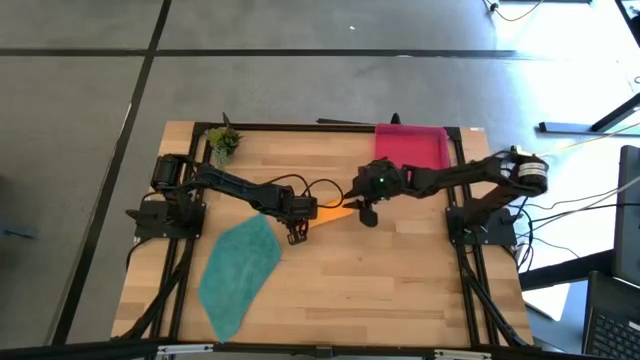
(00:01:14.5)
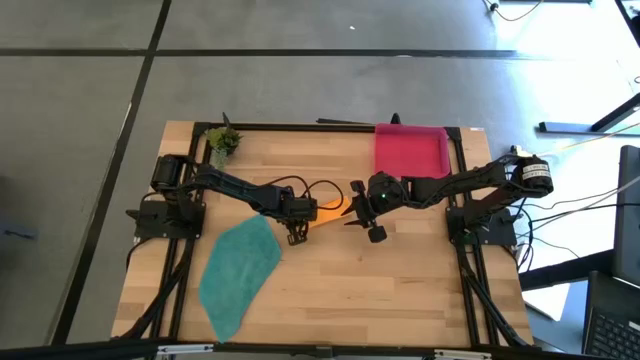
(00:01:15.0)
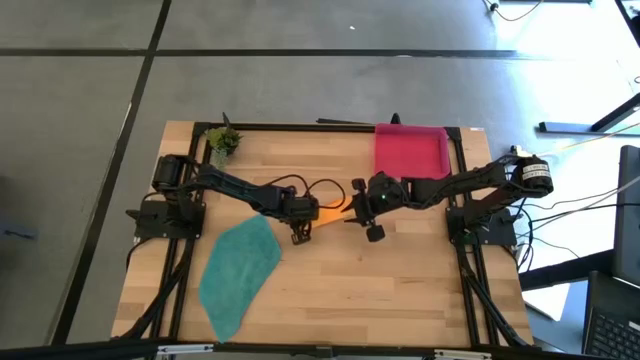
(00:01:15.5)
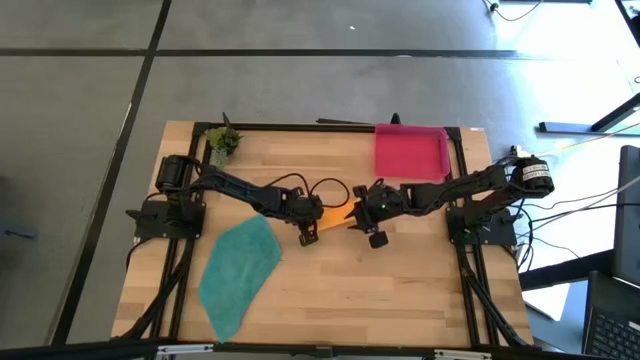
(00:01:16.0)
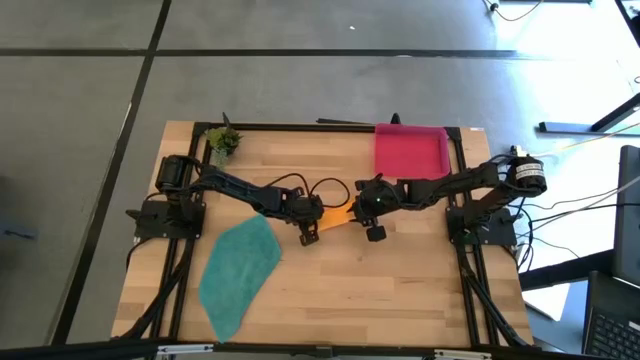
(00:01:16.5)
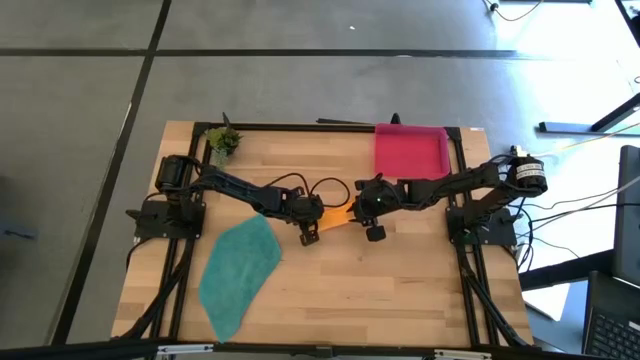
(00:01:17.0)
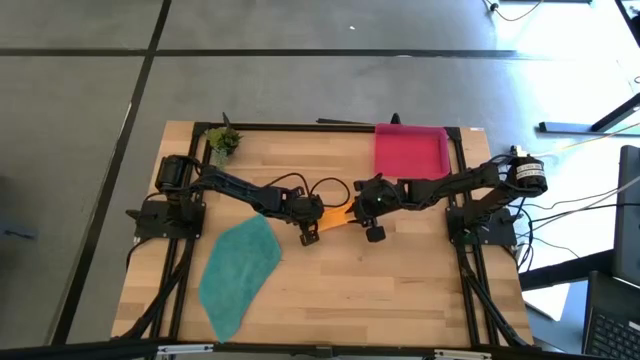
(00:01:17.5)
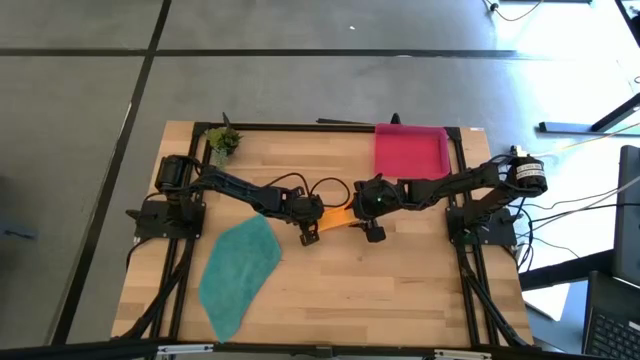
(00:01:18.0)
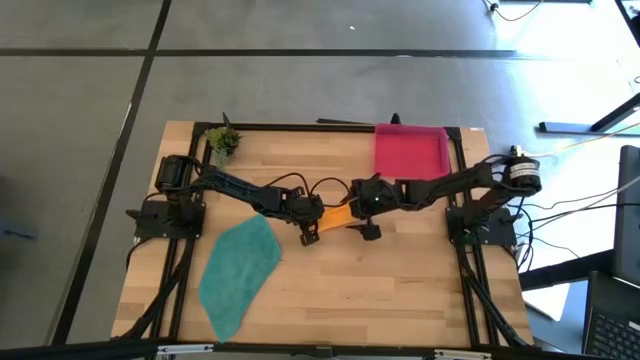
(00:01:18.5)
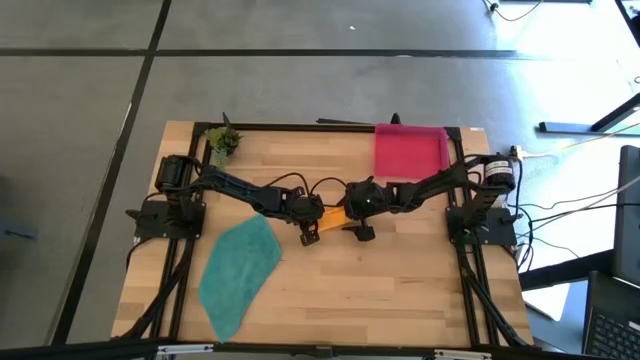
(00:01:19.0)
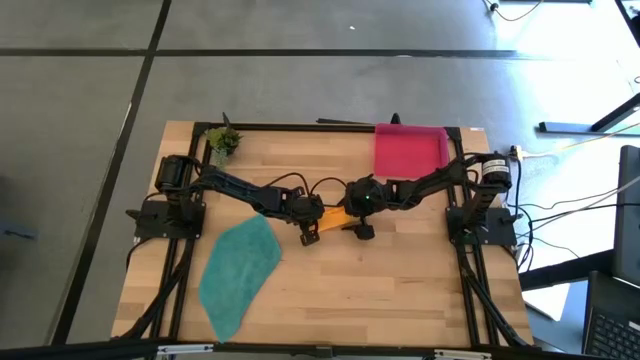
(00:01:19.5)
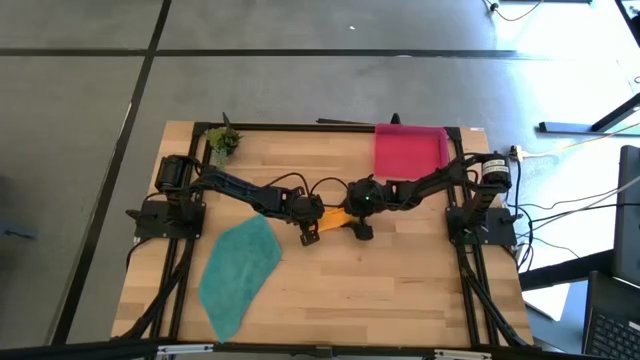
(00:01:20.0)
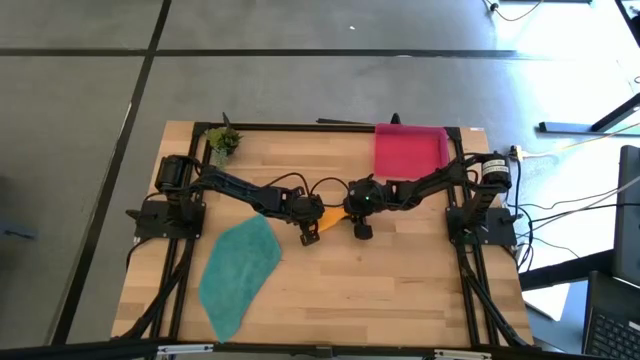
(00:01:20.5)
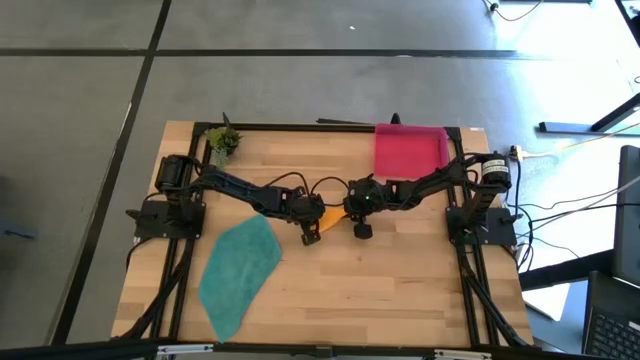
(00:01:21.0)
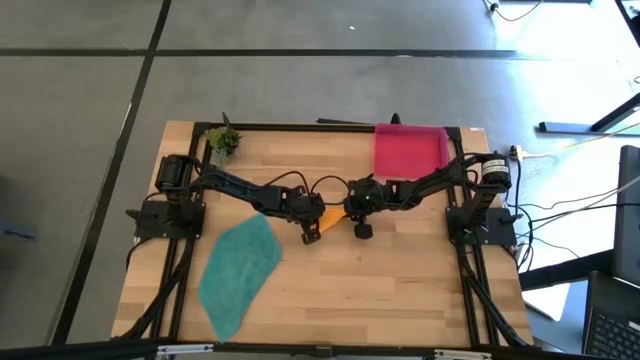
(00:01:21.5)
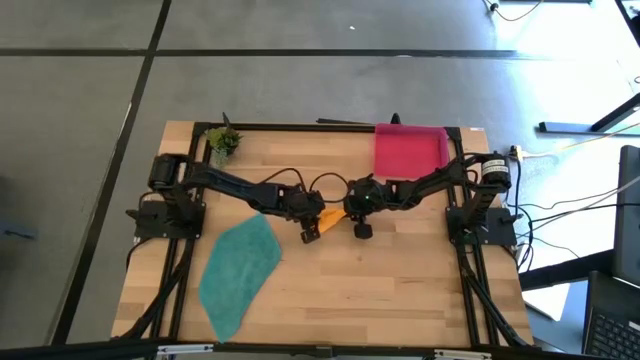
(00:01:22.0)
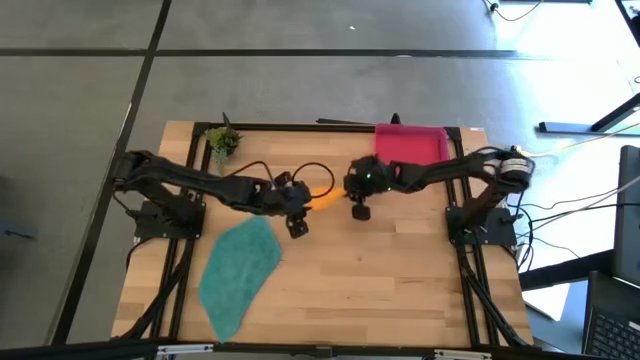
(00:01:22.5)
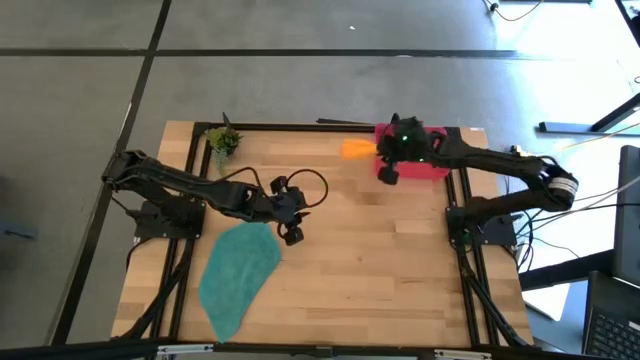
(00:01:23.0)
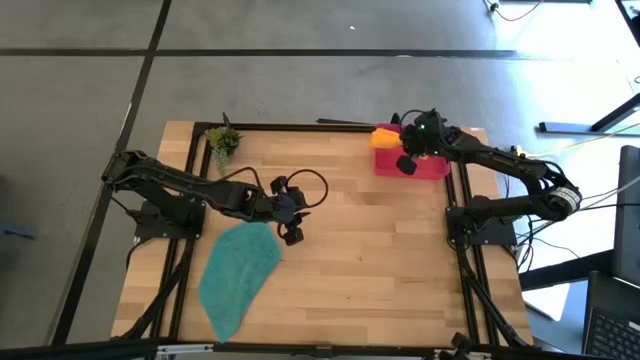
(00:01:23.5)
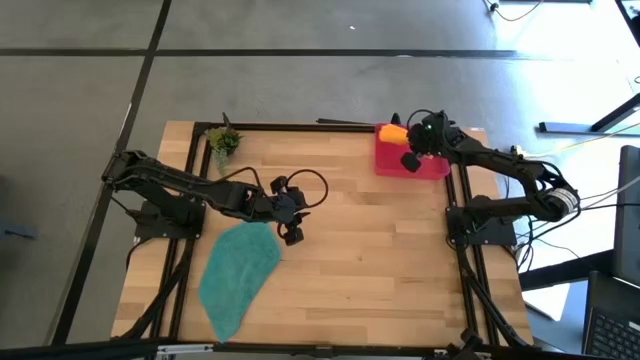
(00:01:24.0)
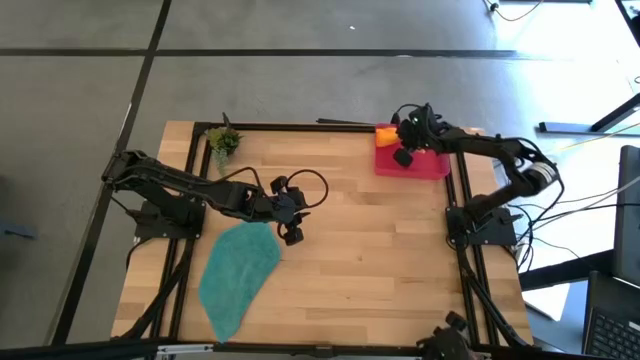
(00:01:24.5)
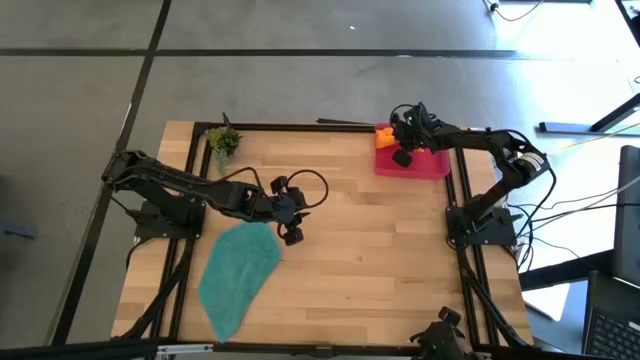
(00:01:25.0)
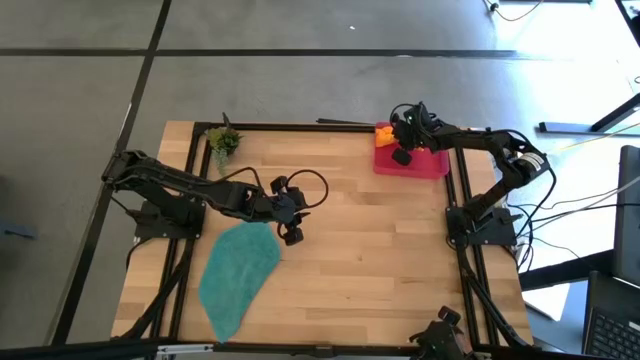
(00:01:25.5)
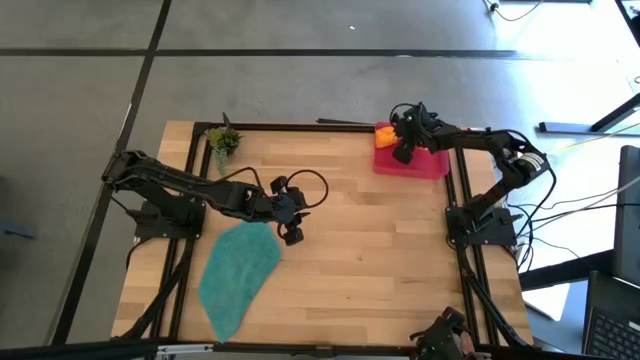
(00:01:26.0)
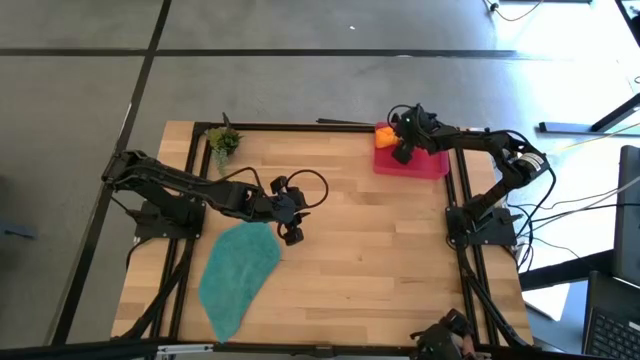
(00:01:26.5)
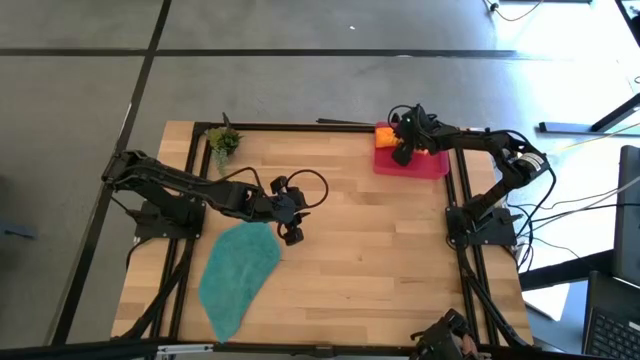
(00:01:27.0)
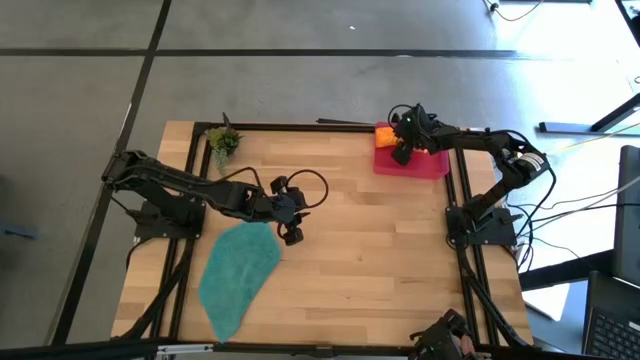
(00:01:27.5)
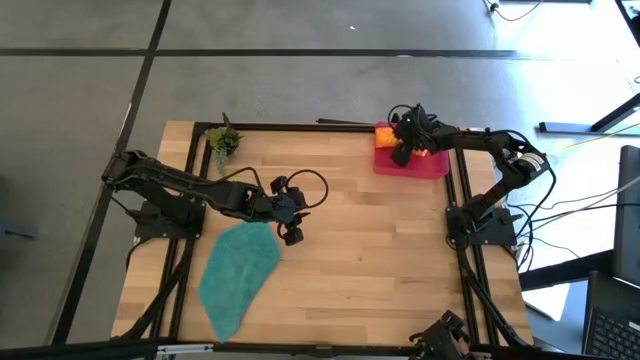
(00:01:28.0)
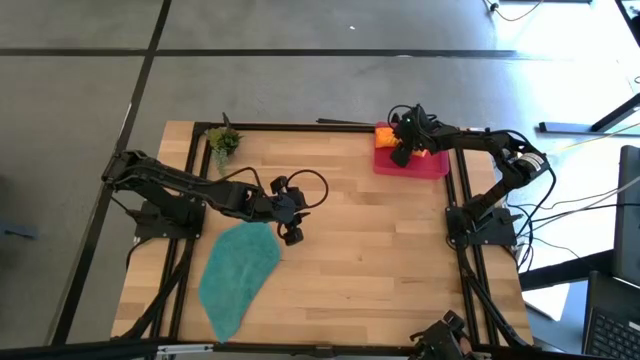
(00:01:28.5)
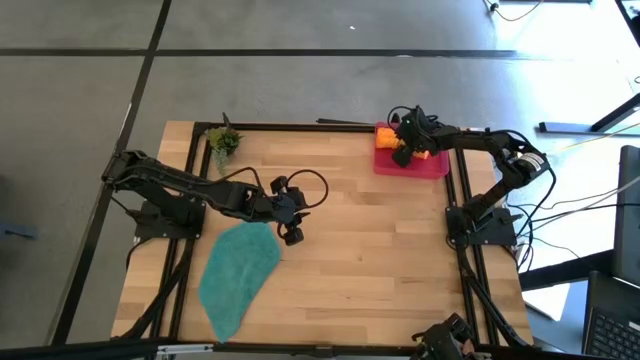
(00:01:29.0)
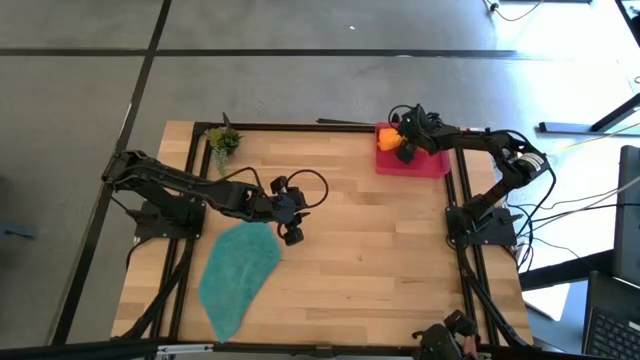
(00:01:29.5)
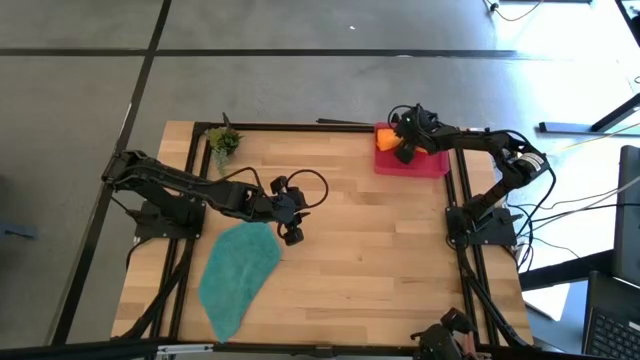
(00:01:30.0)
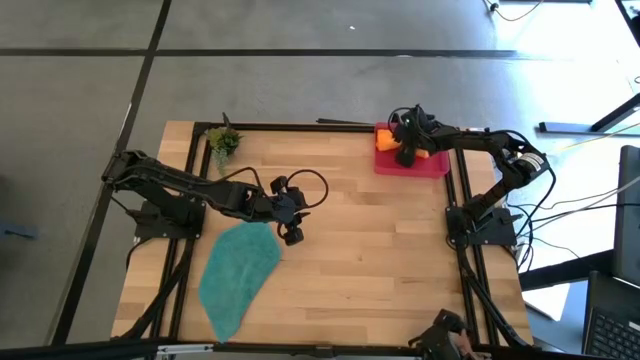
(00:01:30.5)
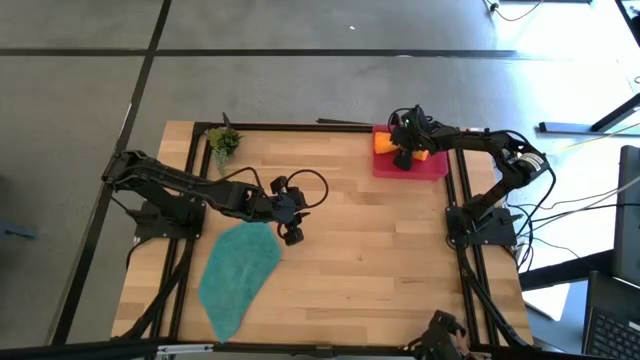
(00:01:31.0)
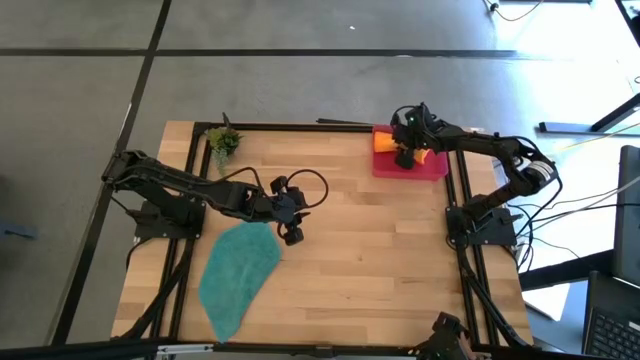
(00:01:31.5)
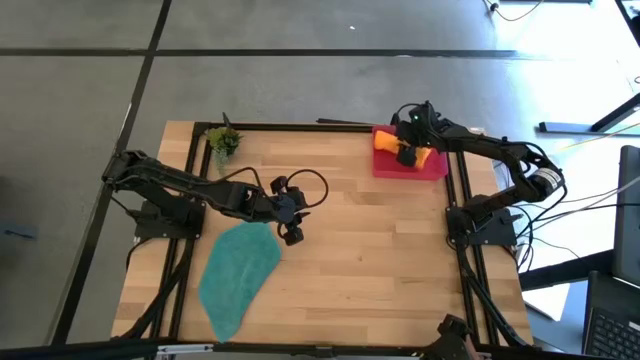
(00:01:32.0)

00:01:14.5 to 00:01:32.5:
Task: Roll microfiber towels into tight, uniform cylinder then place into a basket
Put the rolled orange microfiber towel into the red bin
